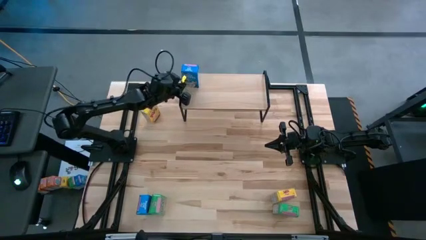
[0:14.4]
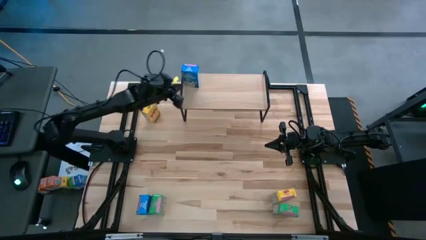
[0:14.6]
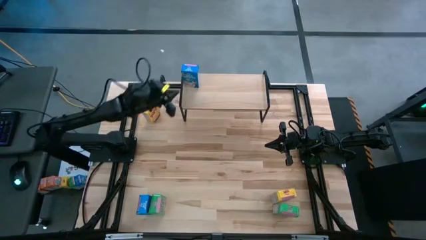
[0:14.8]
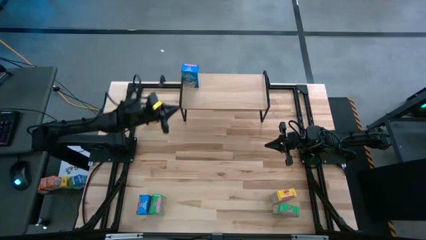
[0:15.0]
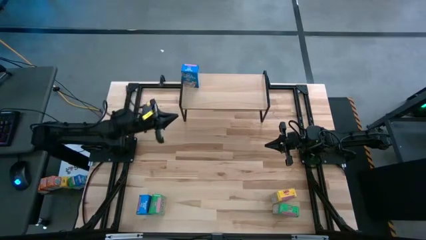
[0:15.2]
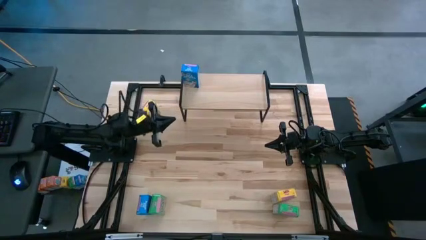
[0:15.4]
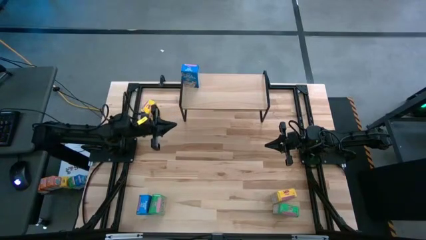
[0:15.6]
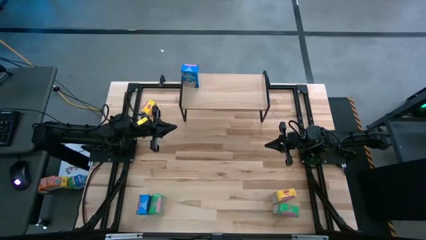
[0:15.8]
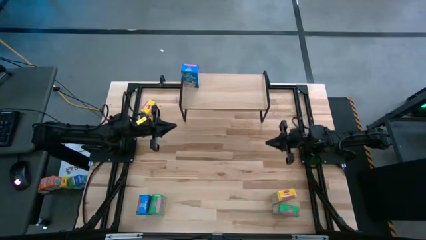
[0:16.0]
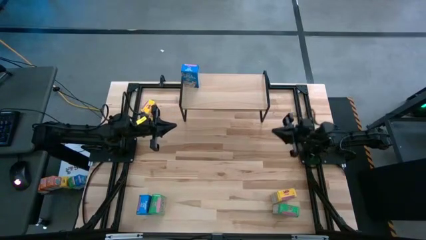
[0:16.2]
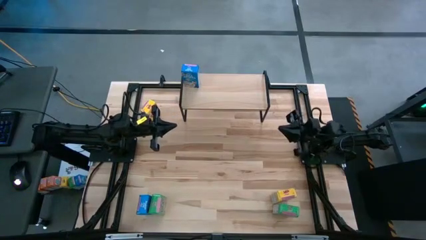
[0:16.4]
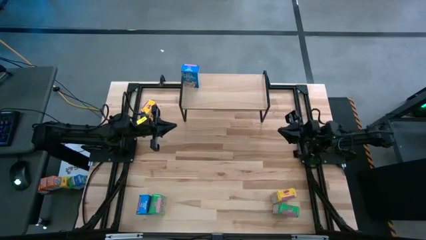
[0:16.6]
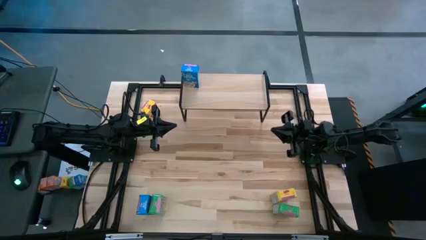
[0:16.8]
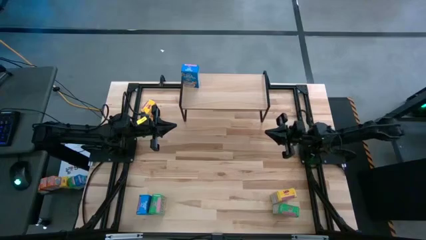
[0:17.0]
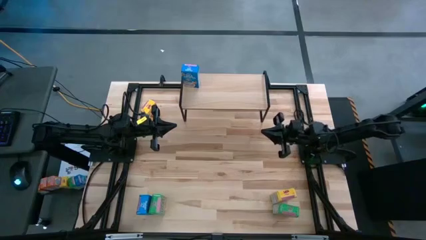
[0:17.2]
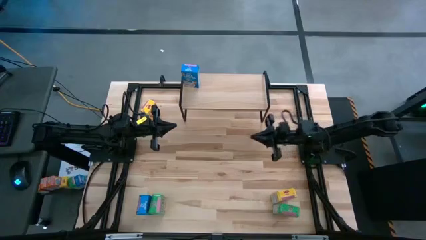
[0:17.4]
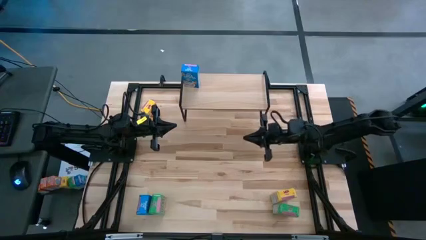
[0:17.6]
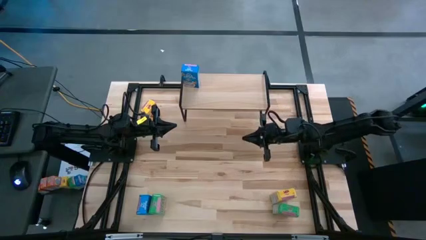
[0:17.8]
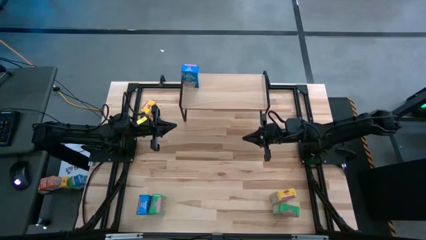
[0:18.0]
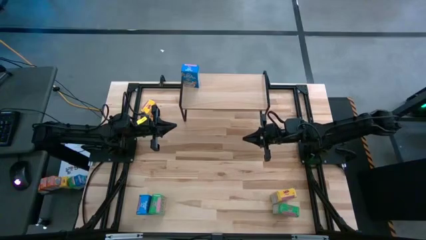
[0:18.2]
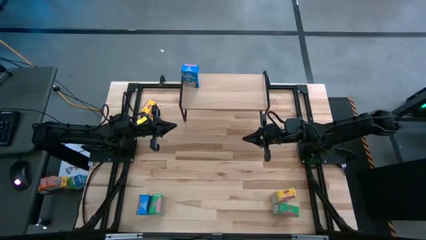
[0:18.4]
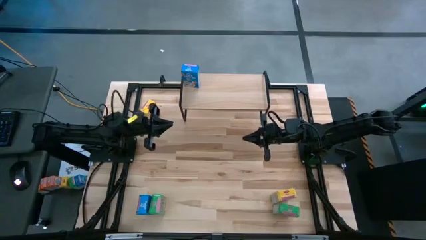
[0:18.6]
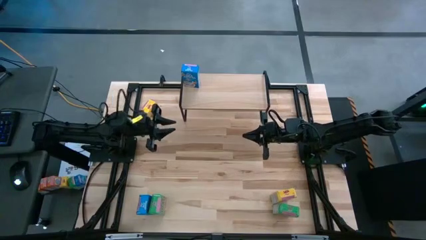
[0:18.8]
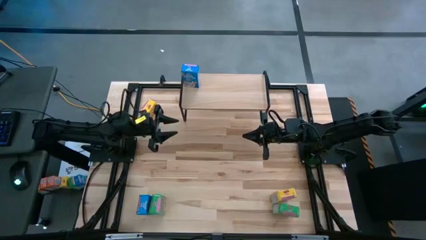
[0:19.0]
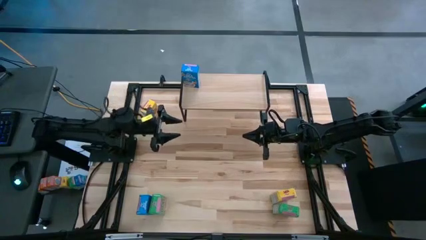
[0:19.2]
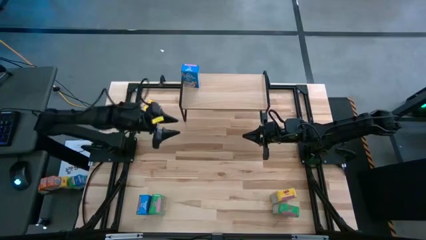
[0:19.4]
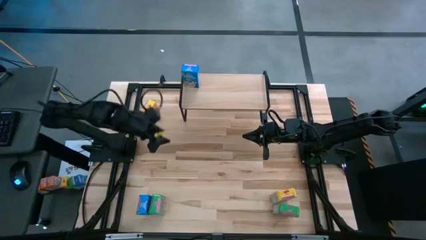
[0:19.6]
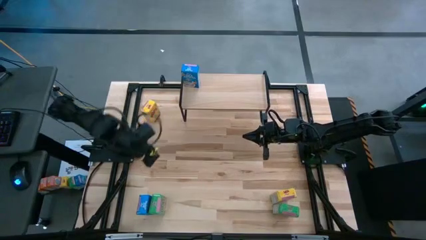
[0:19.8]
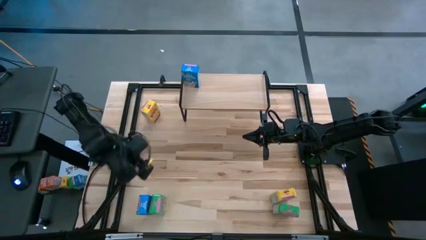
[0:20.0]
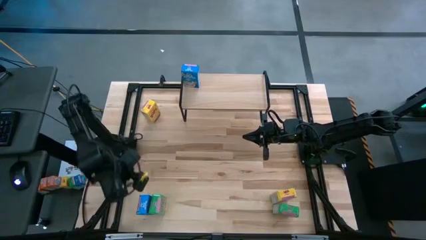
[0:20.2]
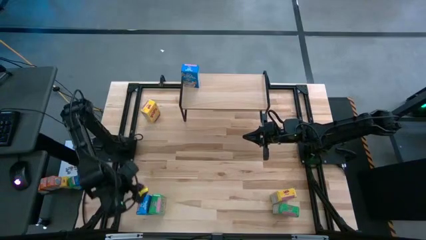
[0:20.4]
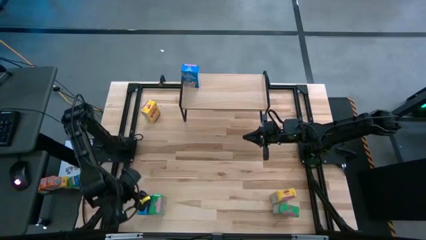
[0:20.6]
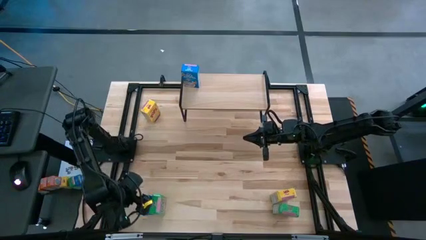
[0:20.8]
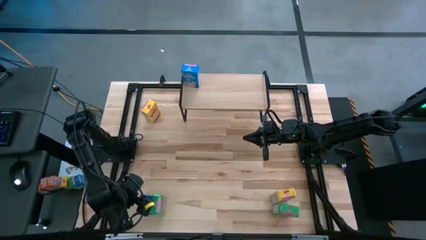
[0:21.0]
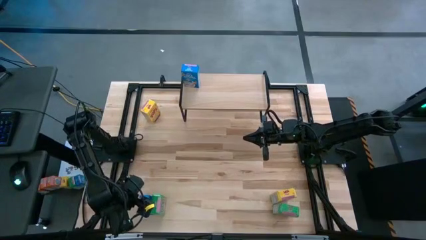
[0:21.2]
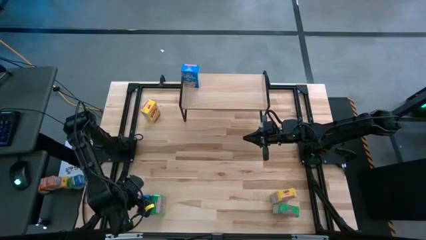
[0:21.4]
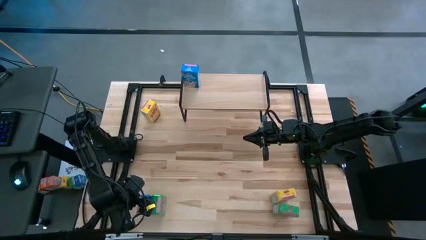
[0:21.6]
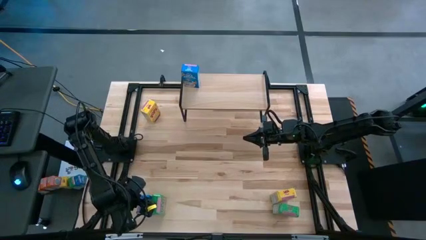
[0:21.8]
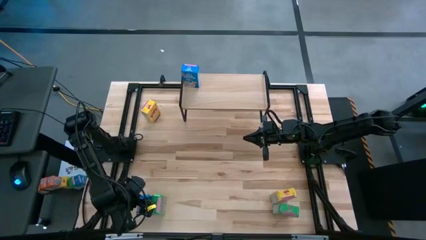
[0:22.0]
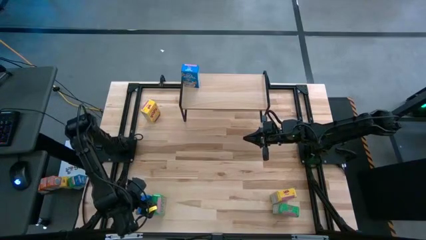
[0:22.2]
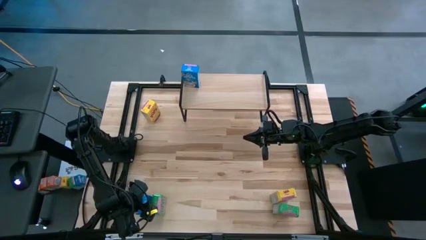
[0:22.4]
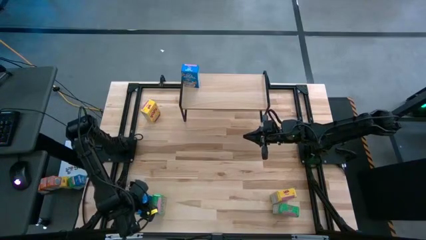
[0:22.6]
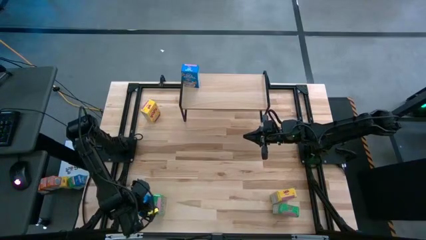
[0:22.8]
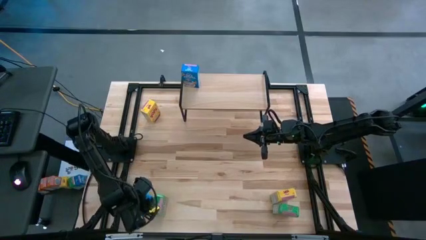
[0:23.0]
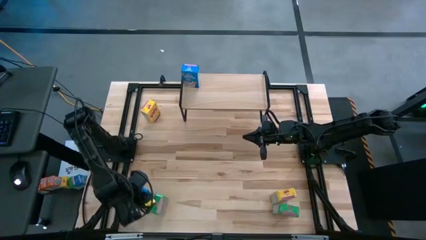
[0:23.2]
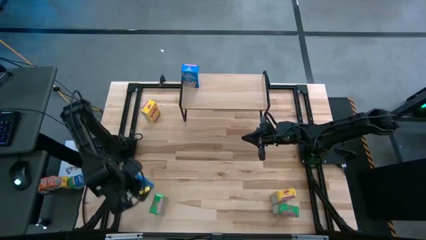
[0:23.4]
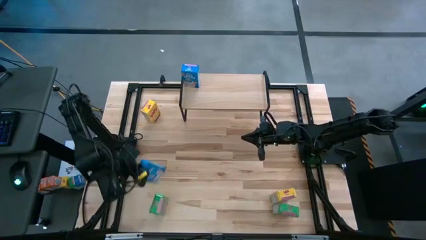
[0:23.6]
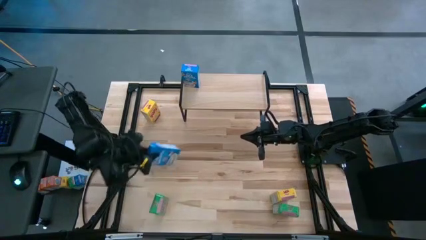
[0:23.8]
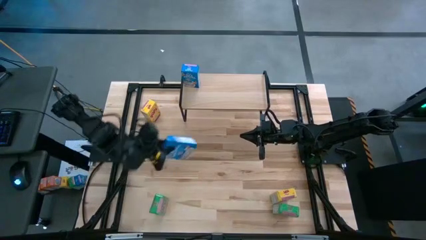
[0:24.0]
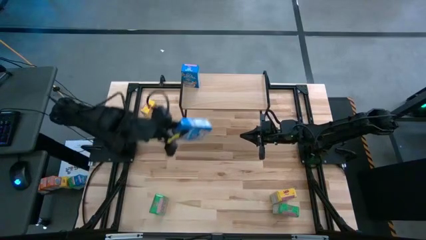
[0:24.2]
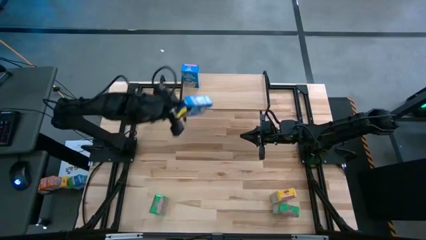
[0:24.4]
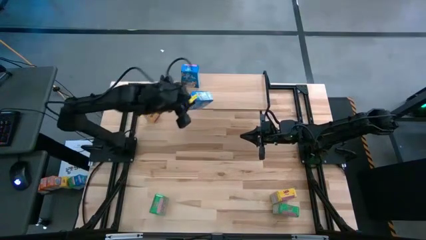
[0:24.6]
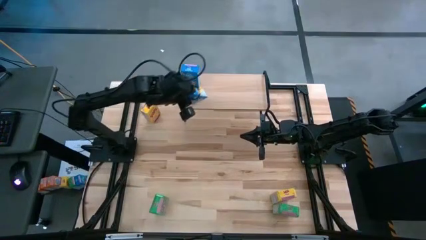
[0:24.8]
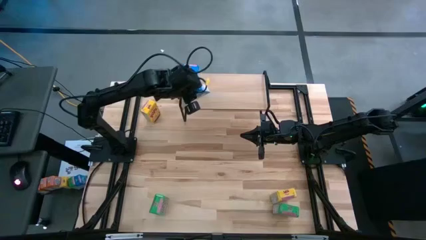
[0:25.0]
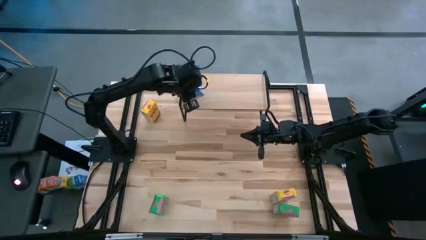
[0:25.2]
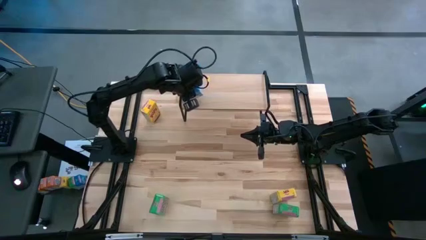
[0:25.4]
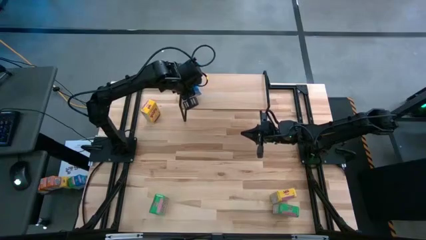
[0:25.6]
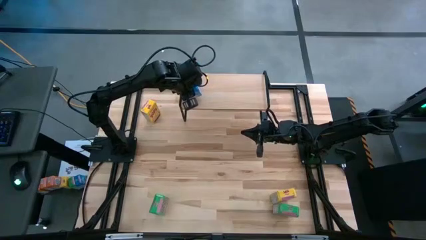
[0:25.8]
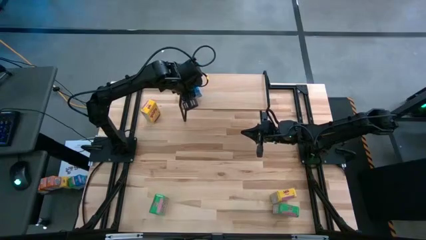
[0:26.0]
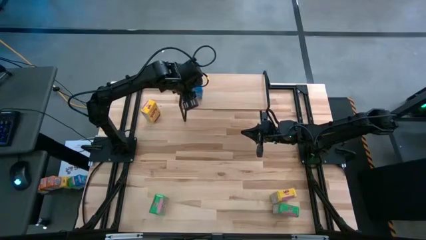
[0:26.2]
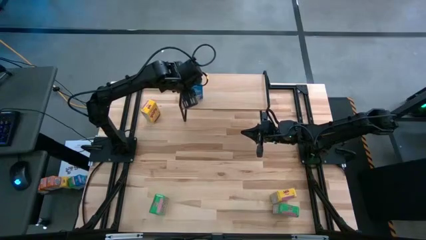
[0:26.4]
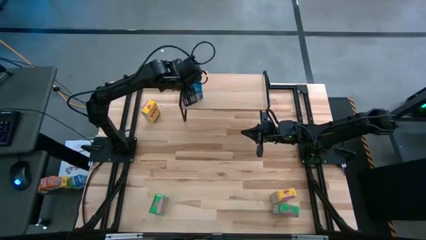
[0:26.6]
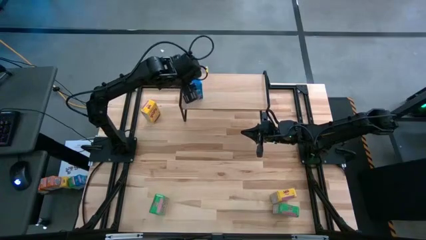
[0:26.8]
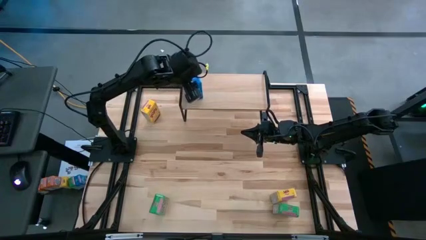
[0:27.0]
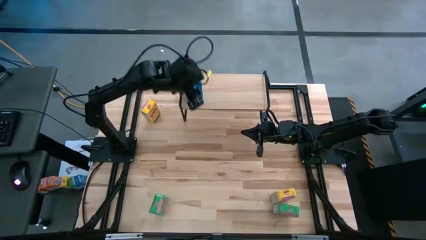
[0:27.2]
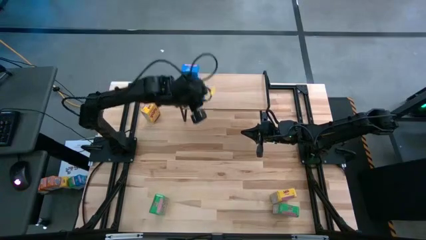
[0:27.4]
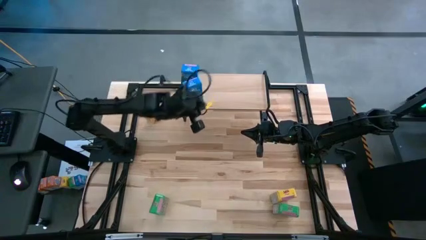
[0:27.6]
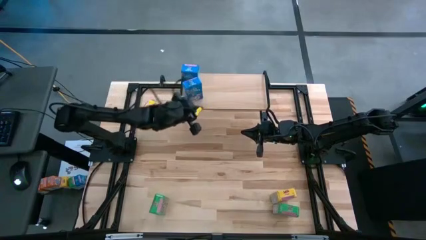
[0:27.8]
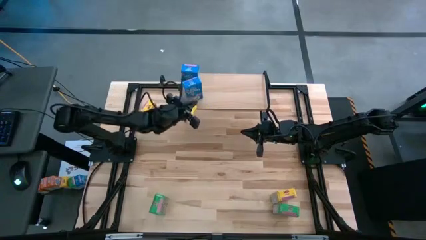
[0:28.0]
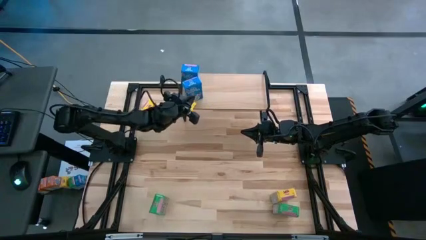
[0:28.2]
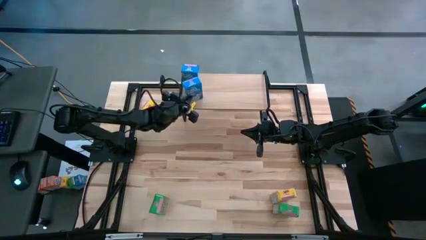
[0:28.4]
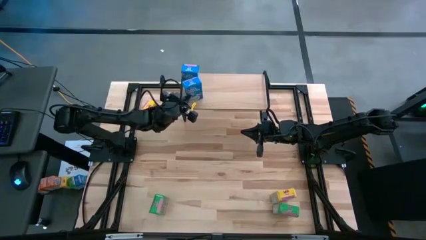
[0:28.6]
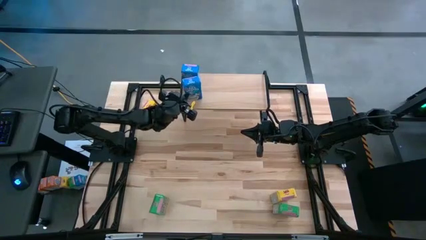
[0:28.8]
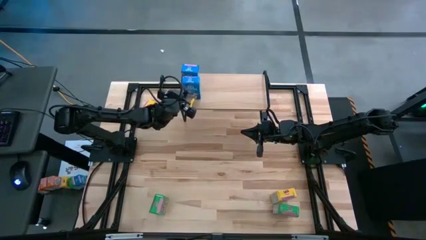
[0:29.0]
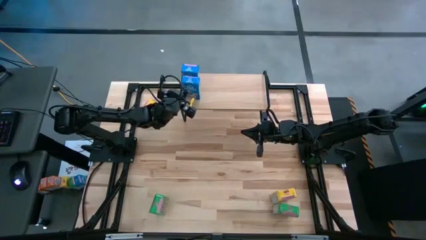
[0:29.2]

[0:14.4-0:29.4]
Task: Stack cereal on shelf
Put the blue cereal box on the shelf aligned with the other blue cereal box
